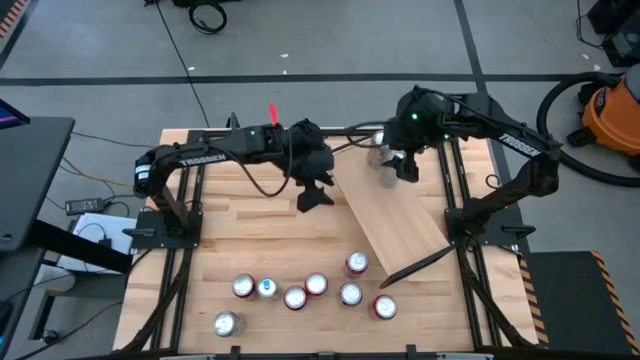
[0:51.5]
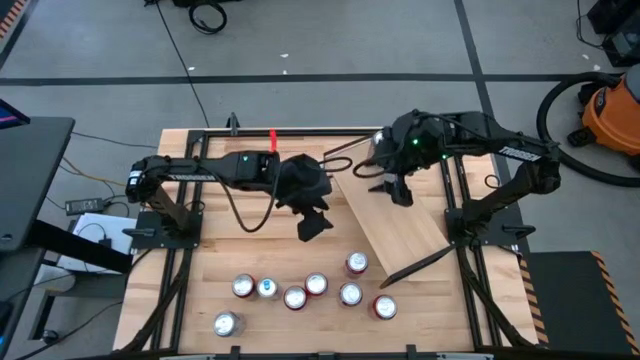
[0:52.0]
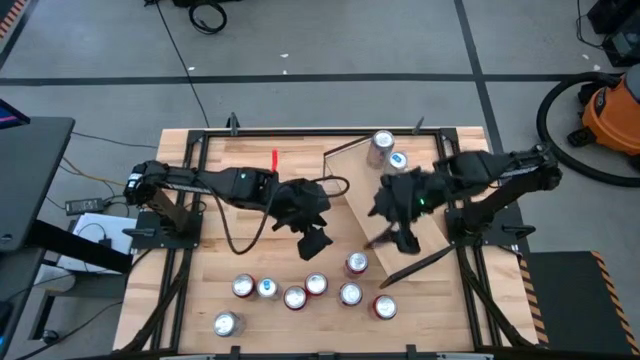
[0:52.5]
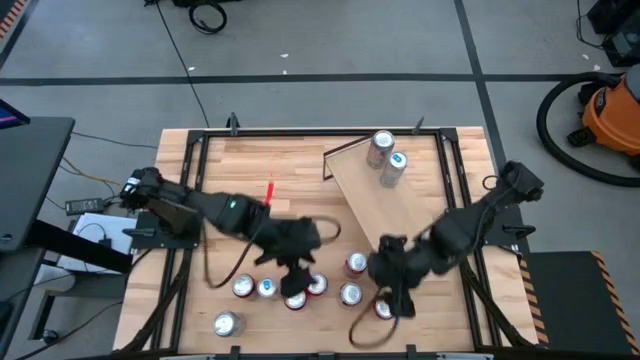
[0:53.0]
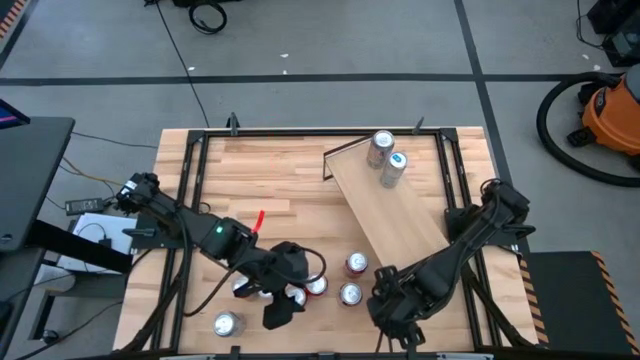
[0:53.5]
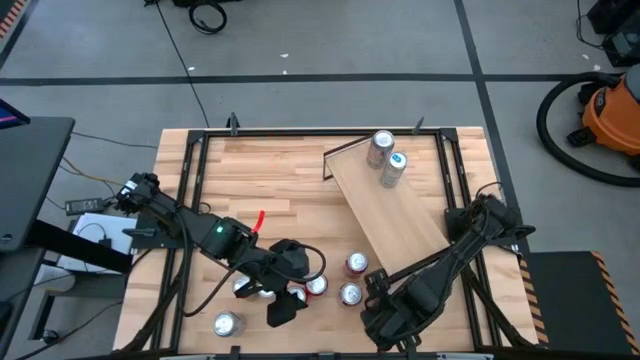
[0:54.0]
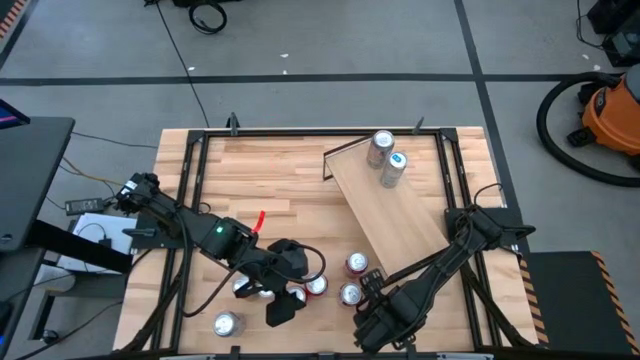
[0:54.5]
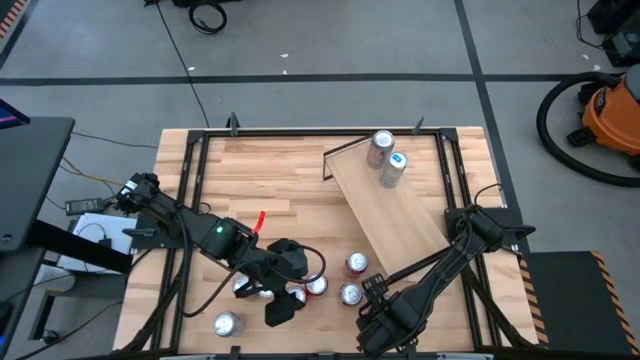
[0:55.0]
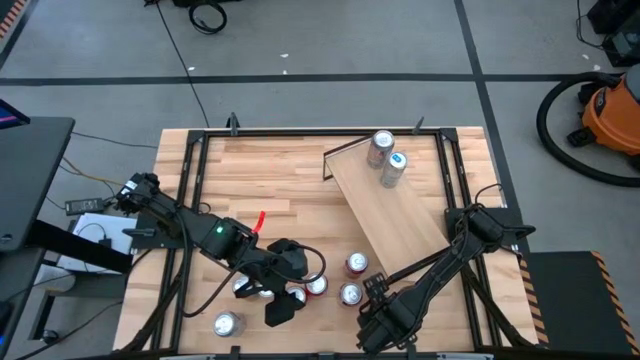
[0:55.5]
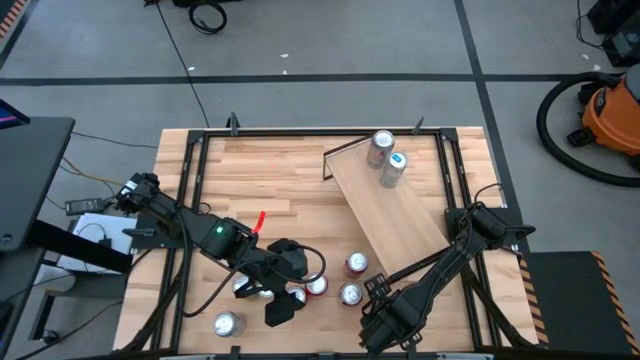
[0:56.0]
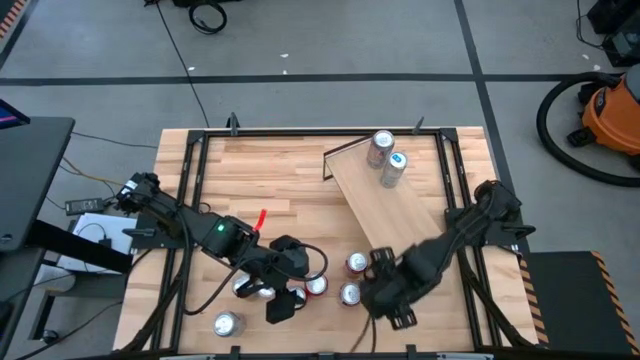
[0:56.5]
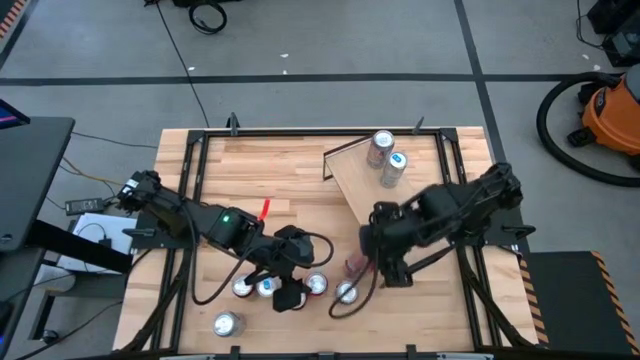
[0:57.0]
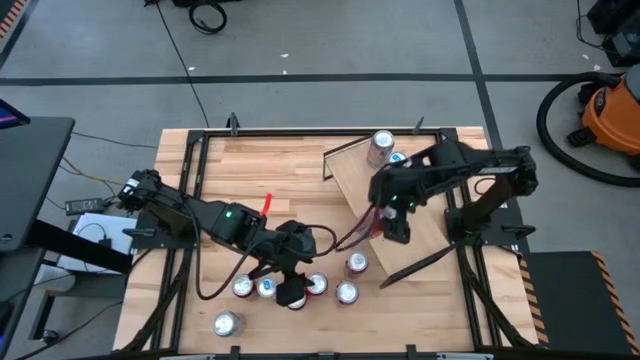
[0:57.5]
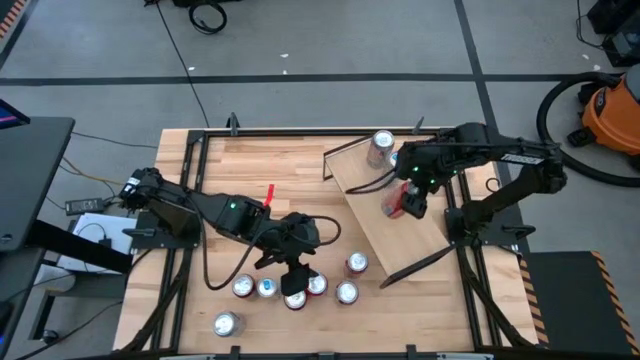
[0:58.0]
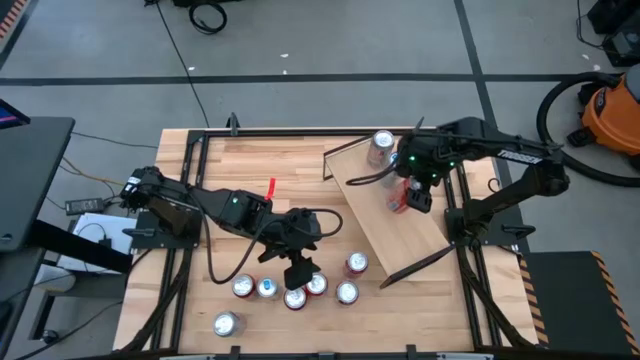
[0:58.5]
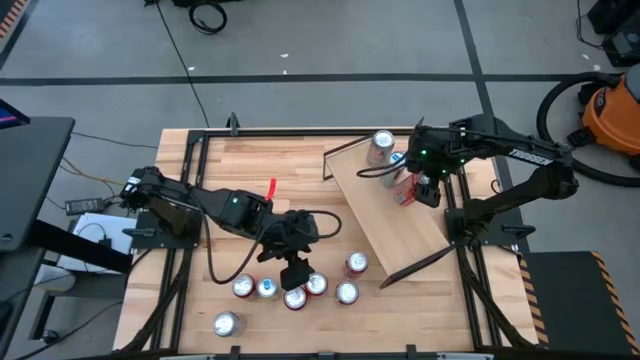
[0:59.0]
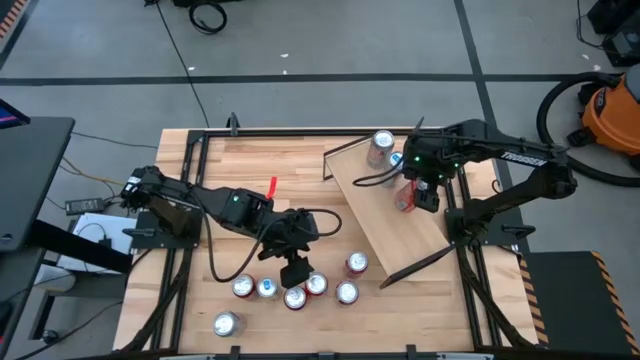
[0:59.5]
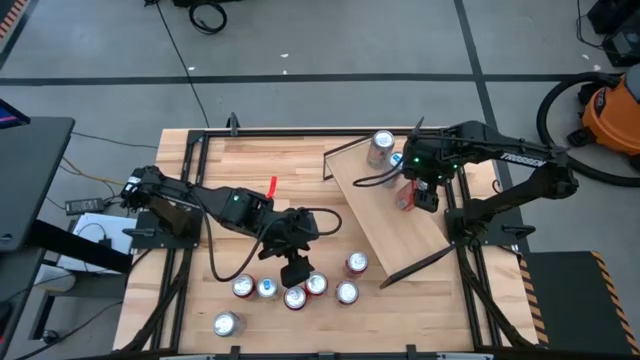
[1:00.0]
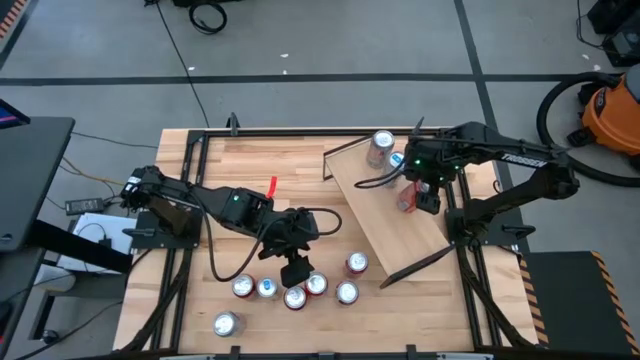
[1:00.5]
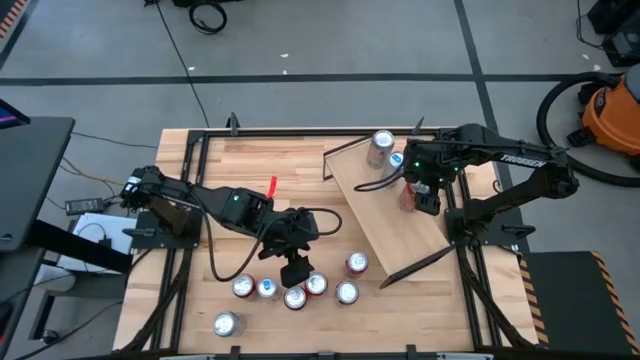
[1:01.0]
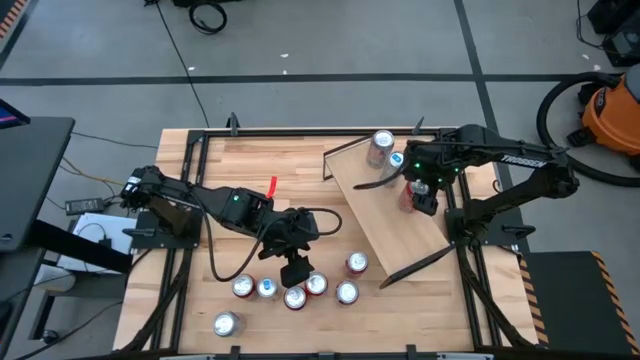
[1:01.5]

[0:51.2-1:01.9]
Task: Place canned beverage on shelf
Put the right orange soda can on the shelf

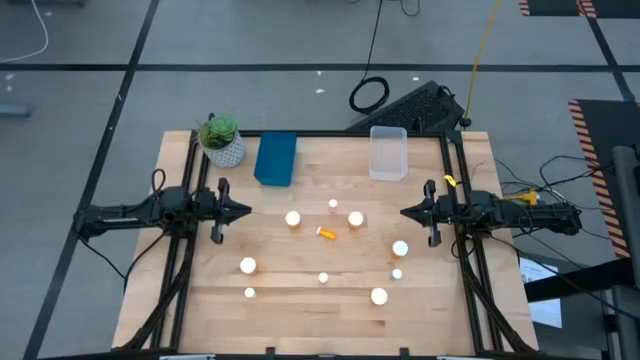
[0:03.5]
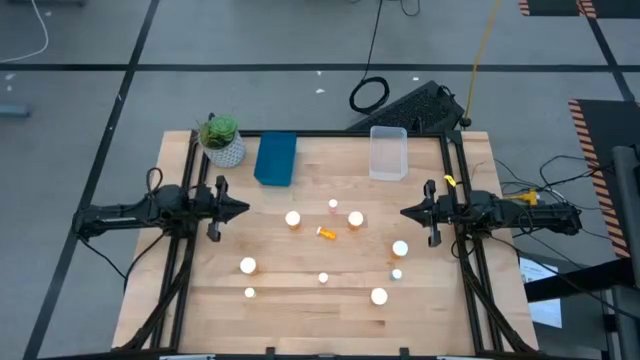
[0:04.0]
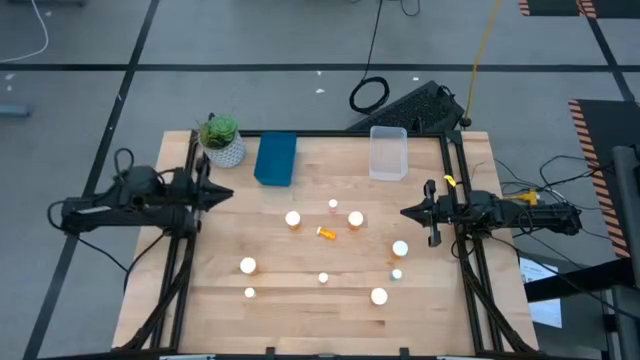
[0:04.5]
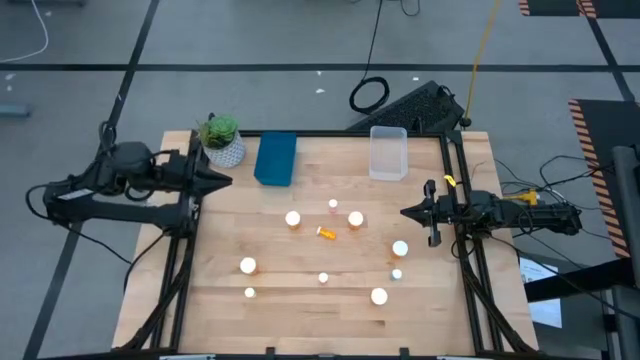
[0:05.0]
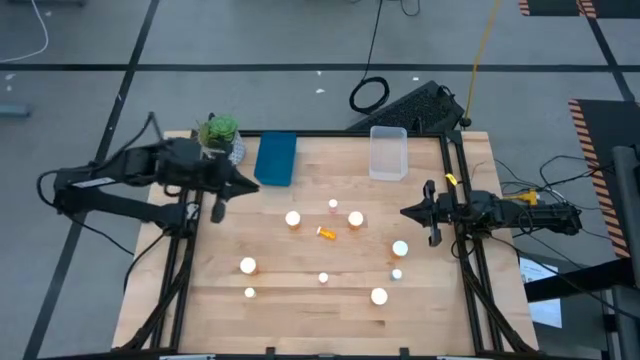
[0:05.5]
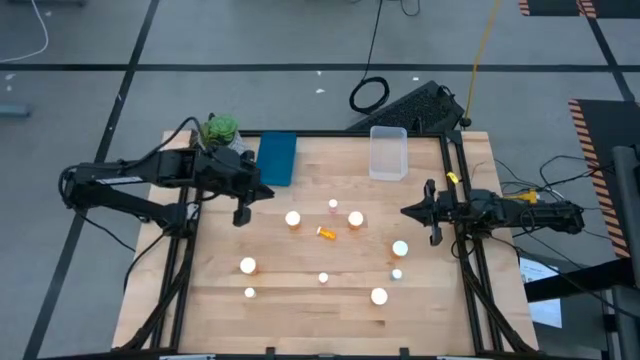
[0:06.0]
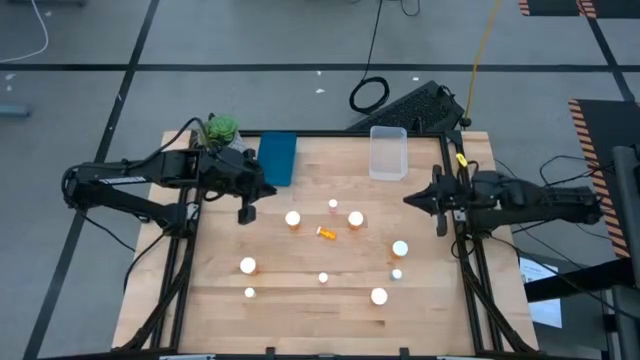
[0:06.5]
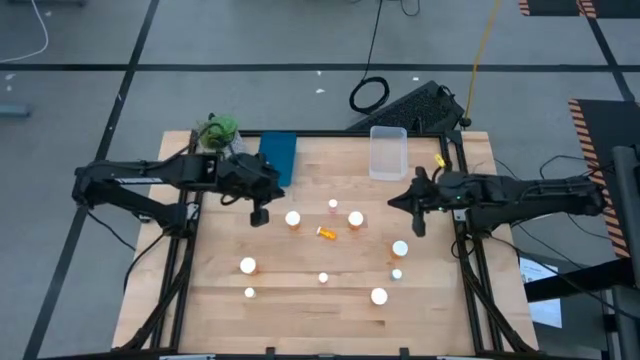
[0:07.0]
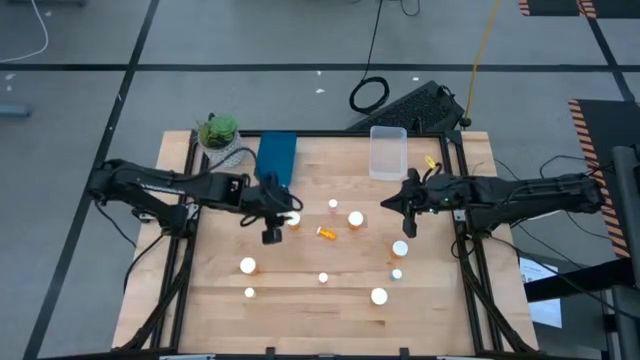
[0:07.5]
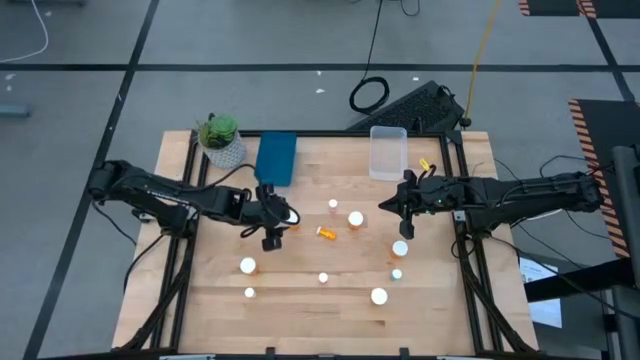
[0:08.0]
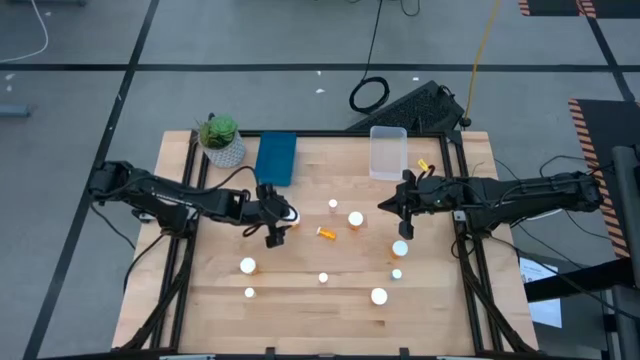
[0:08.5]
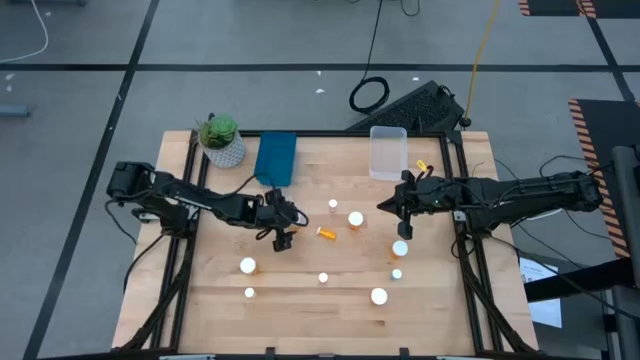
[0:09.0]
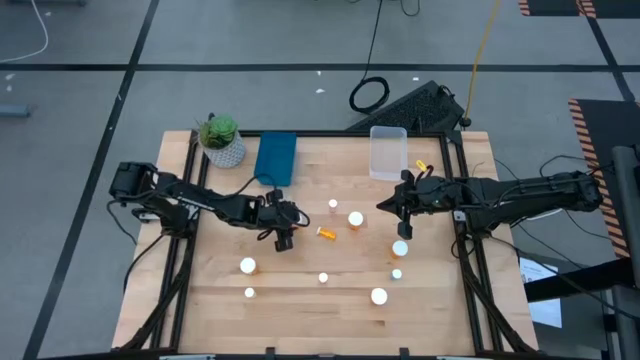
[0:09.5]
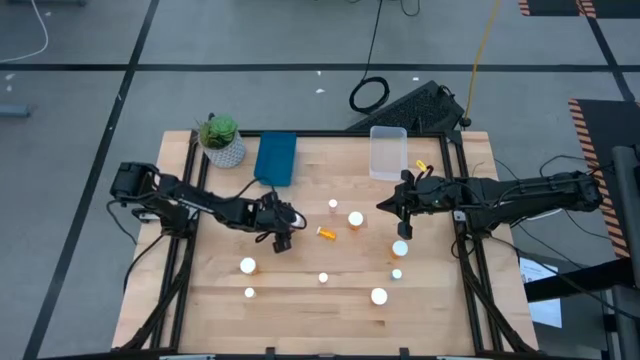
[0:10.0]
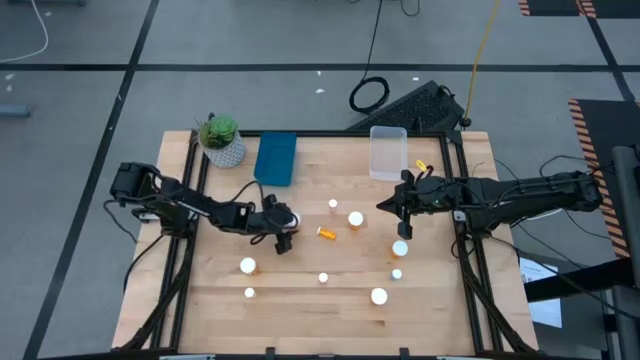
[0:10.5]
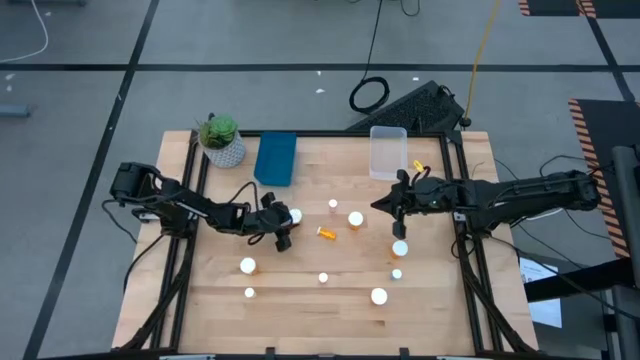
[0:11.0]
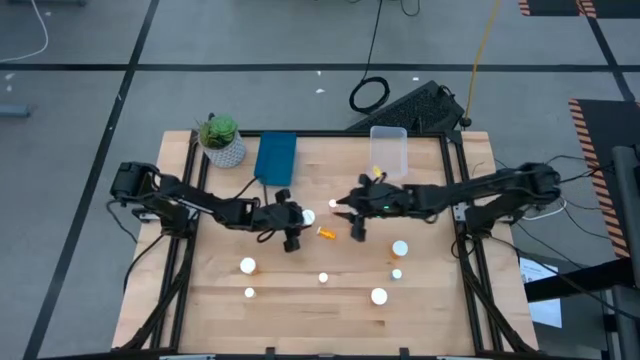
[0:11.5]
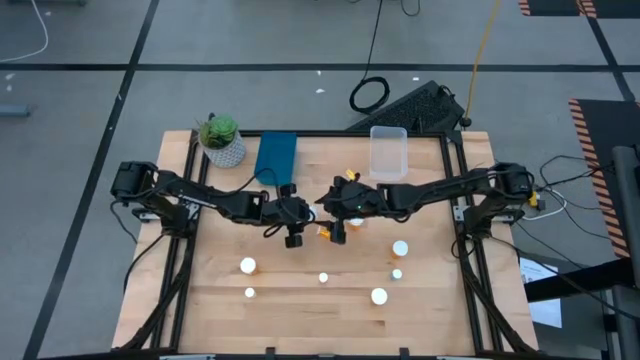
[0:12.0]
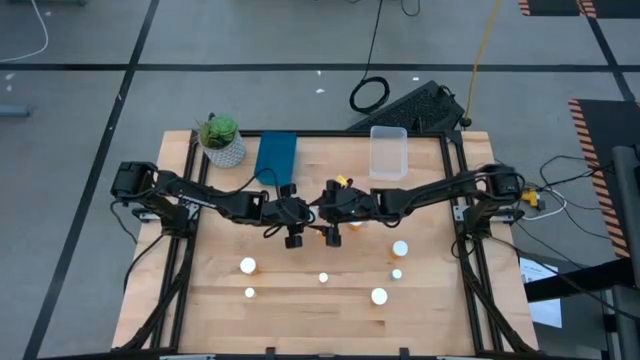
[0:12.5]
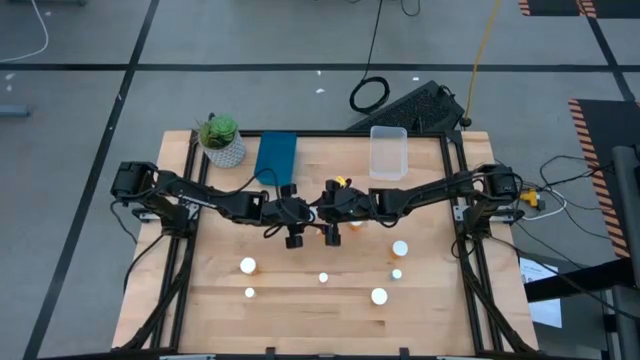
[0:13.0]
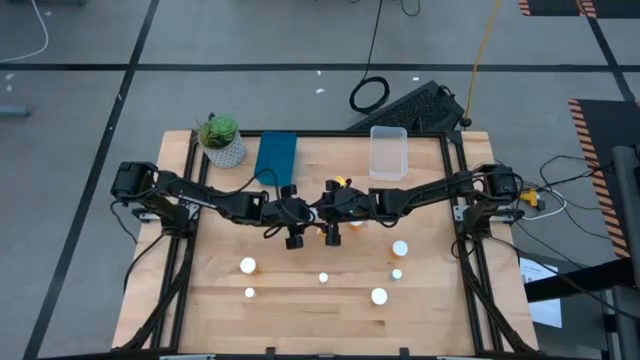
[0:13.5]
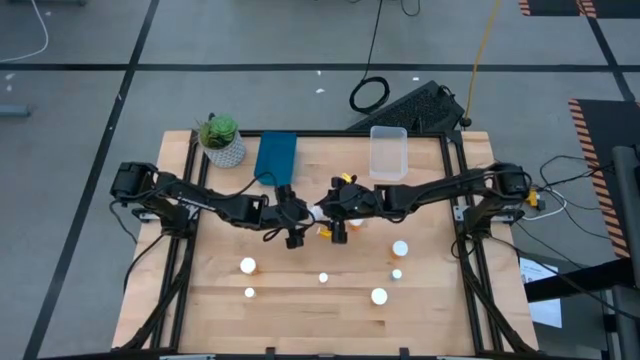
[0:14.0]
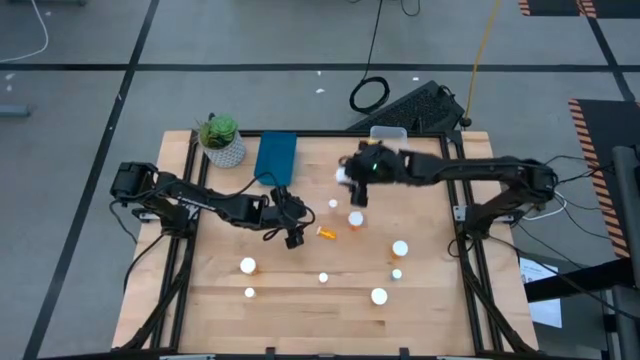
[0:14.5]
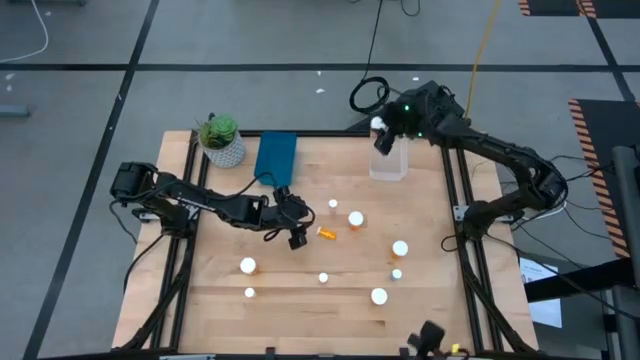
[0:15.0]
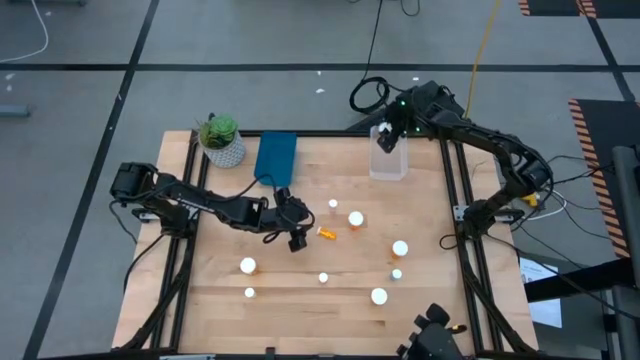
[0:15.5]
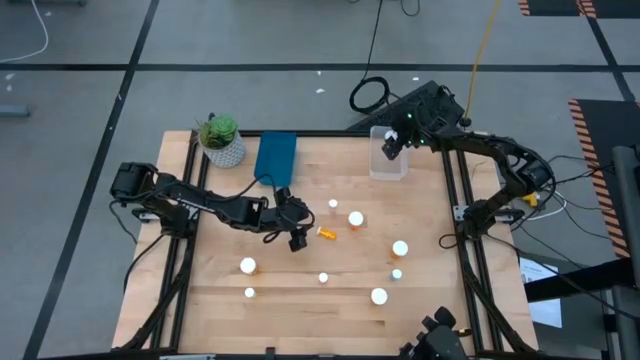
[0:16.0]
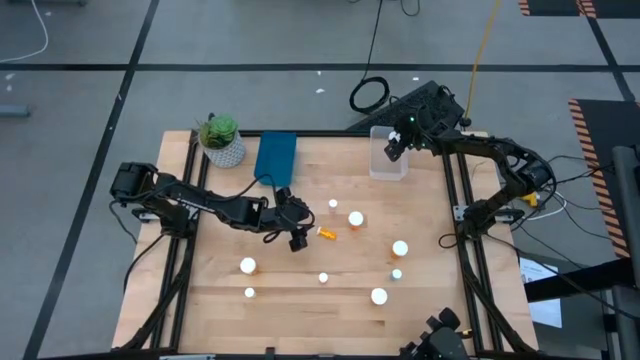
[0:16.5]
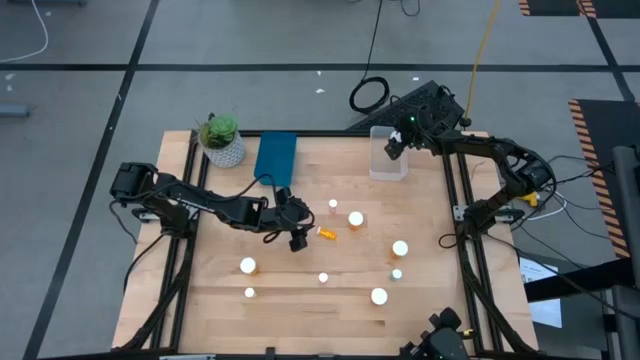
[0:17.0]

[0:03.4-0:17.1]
Task: Pick and place medicine bottles into bin by pill shape (circle, oval)
Put the orange bottled capsules into the transparent bin
